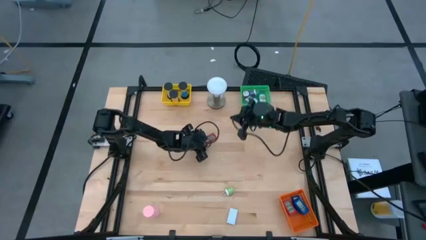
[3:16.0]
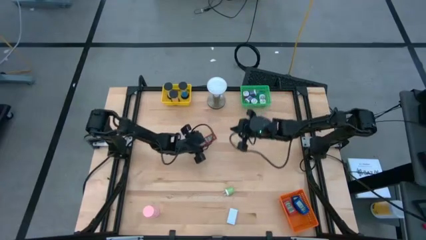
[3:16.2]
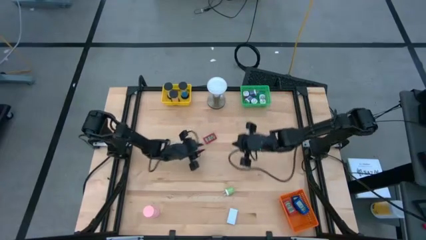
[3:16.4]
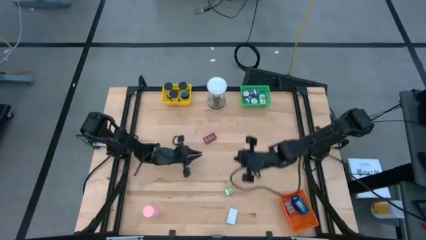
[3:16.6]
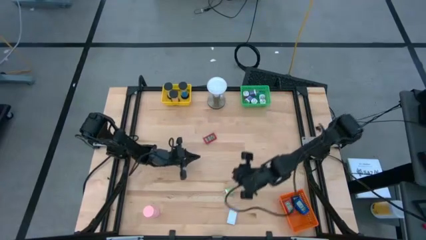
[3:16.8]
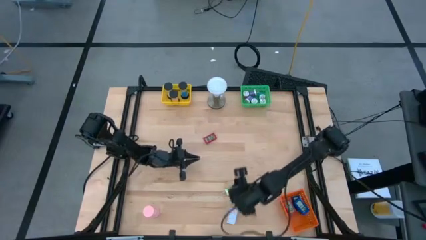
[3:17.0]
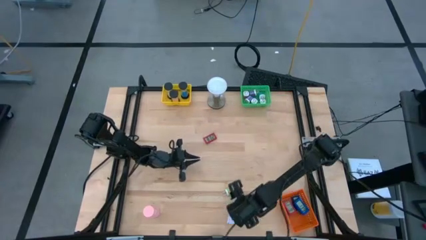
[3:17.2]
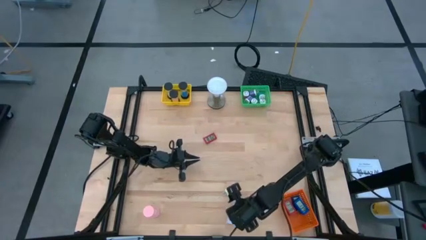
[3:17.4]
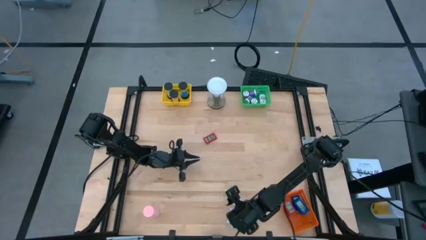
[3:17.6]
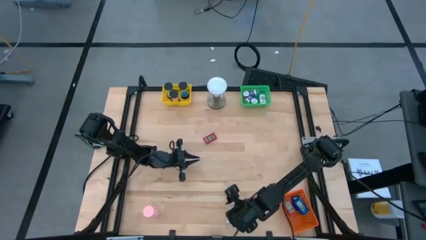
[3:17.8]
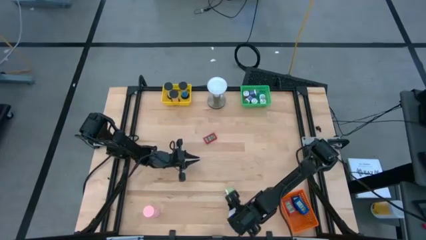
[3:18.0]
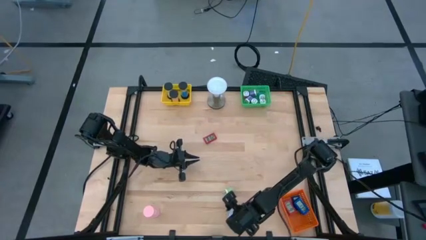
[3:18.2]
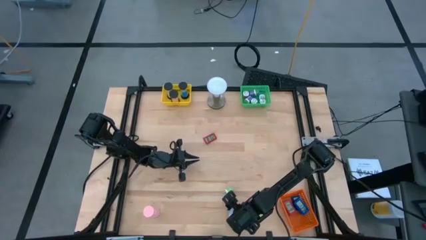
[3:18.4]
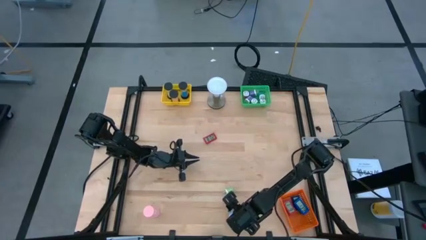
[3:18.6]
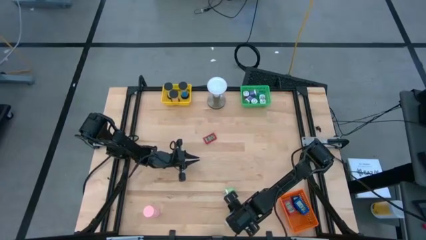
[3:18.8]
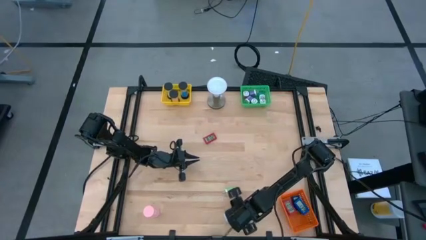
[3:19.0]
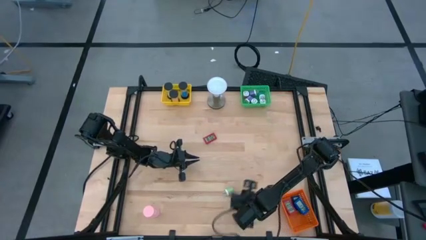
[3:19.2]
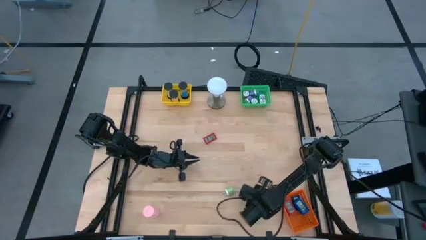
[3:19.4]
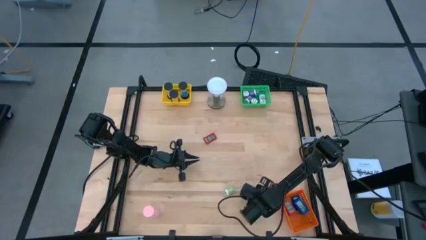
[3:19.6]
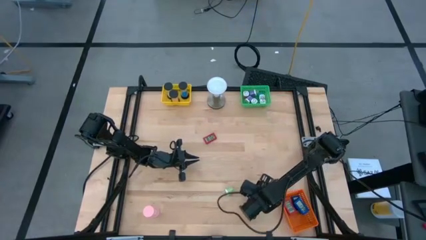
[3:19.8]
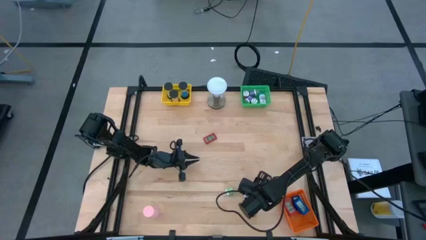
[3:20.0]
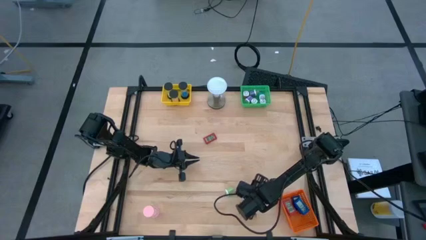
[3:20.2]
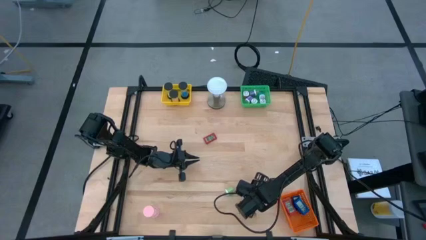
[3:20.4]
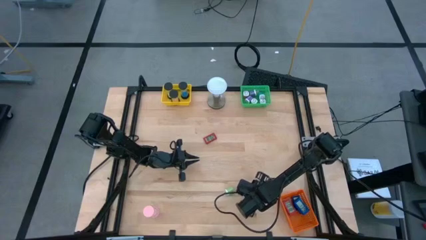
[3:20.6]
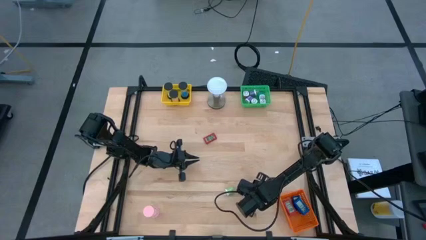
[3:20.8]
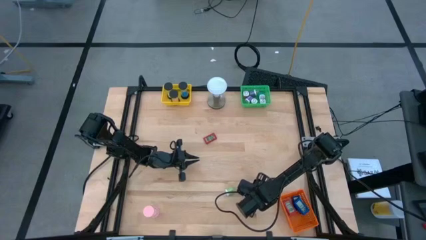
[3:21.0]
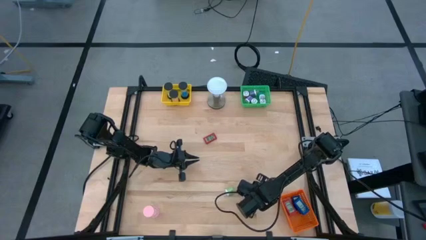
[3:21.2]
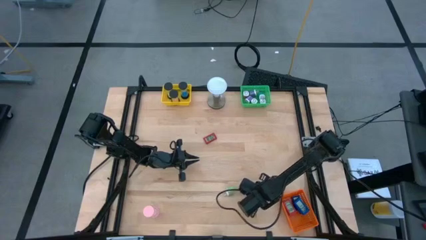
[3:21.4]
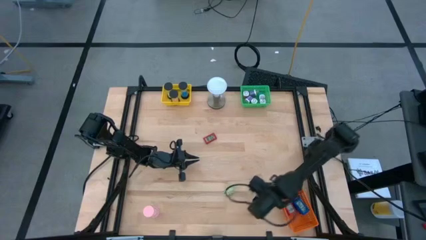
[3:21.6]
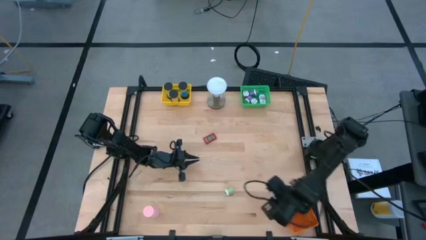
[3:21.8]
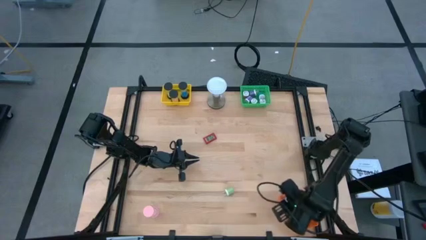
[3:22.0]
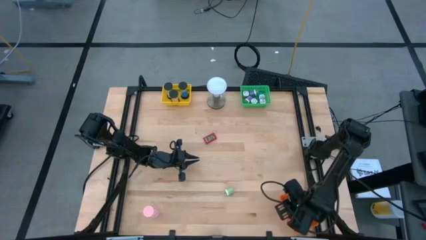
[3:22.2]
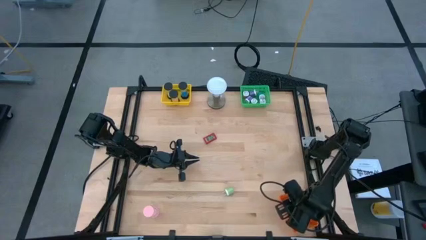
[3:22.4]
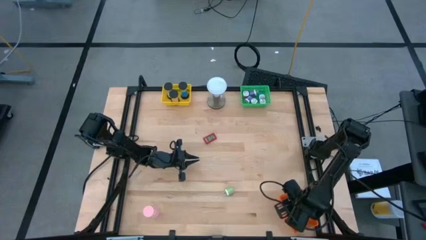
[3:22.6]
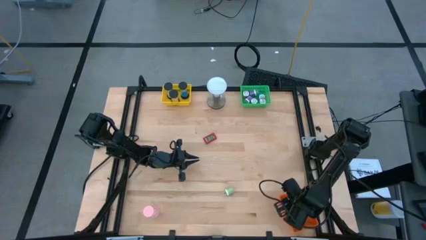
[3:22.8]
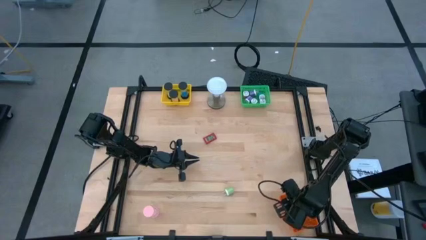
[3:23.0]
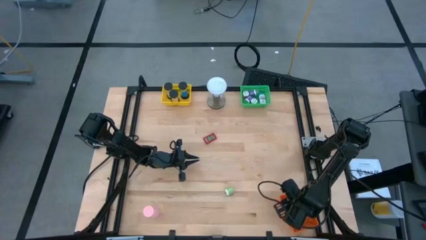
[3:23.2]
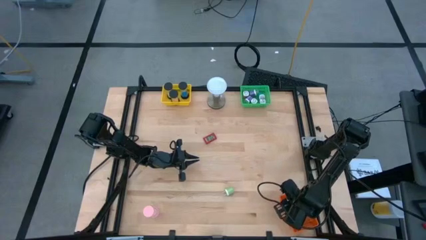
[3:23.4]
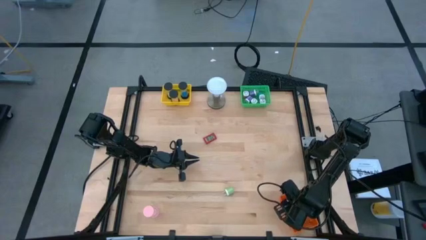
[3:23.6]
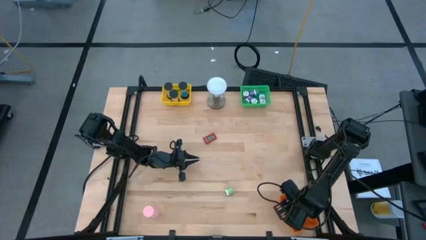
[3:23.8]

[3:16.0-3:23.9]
Task: Pick & Place Office items
Put the white digital timer into the orange bin

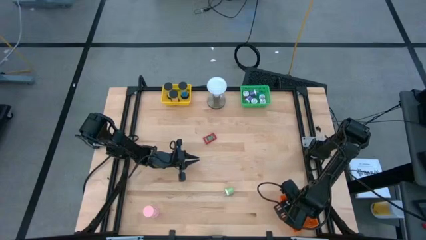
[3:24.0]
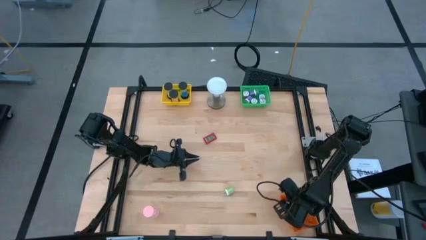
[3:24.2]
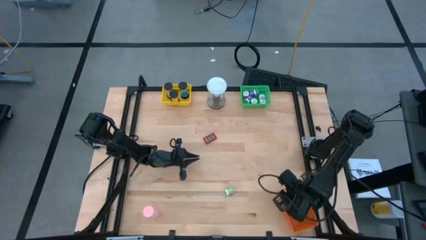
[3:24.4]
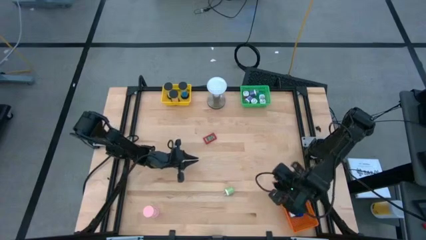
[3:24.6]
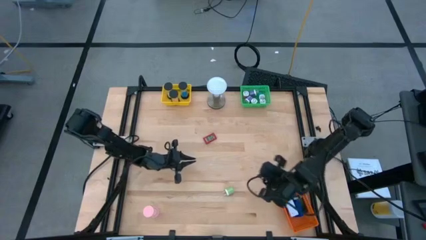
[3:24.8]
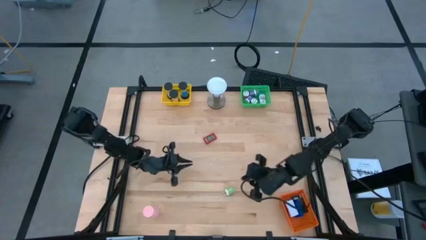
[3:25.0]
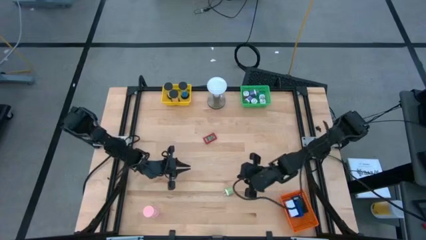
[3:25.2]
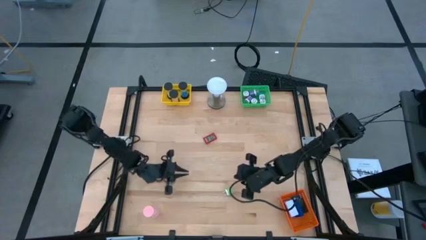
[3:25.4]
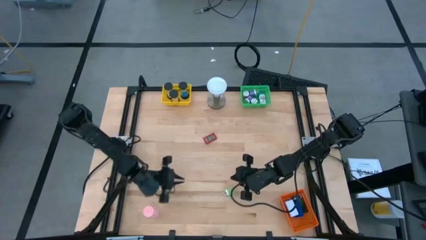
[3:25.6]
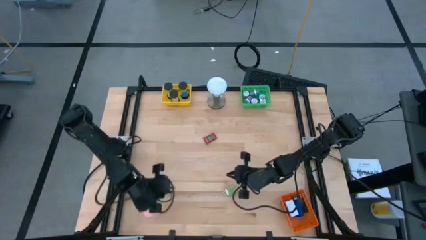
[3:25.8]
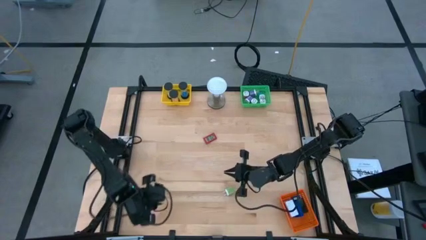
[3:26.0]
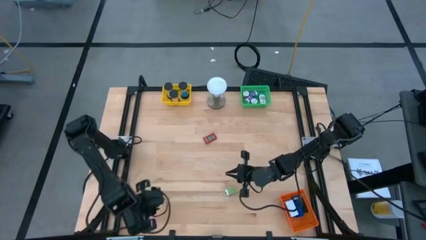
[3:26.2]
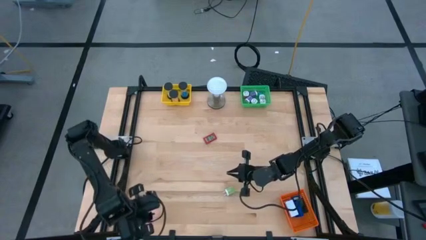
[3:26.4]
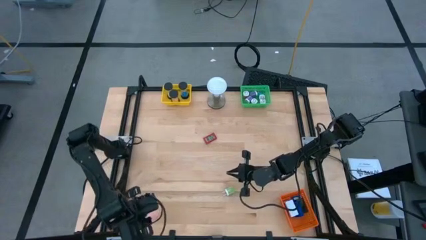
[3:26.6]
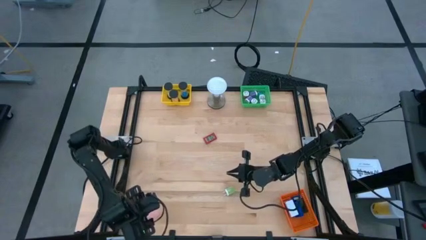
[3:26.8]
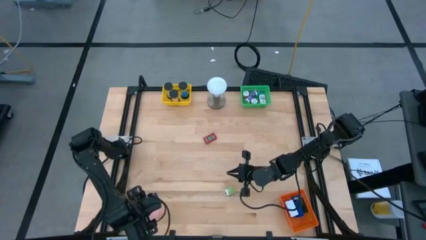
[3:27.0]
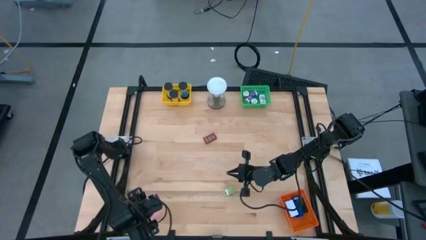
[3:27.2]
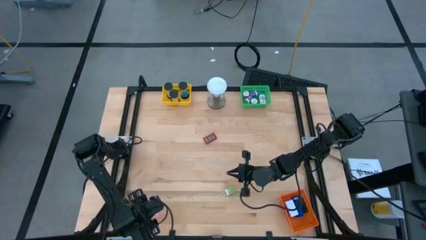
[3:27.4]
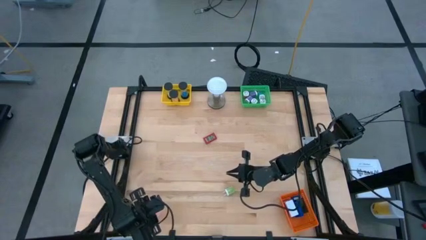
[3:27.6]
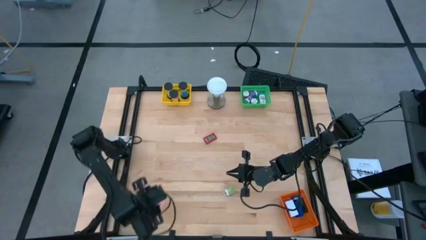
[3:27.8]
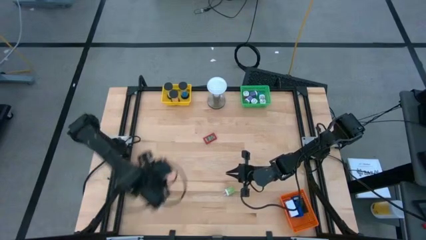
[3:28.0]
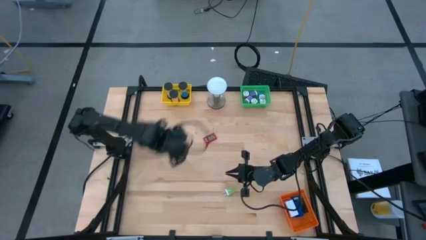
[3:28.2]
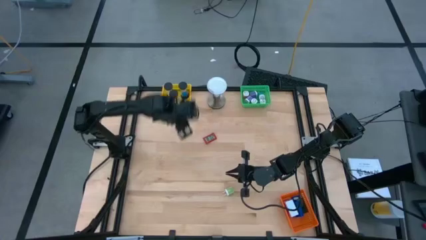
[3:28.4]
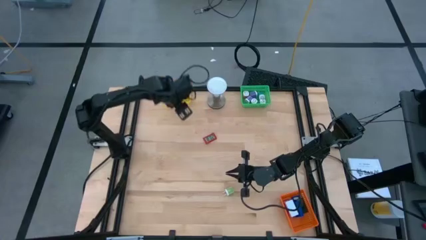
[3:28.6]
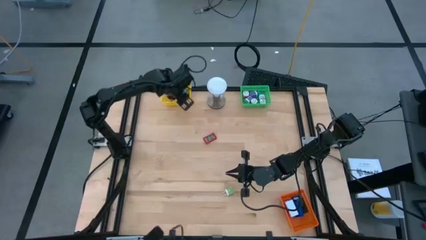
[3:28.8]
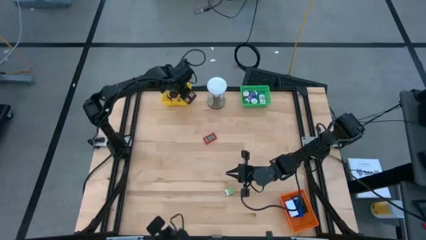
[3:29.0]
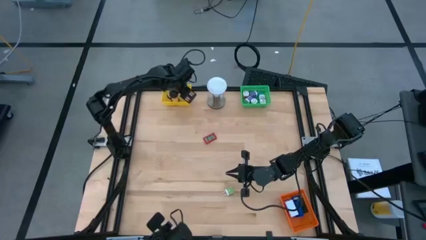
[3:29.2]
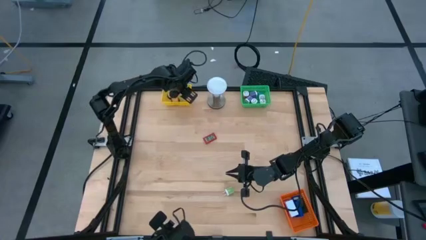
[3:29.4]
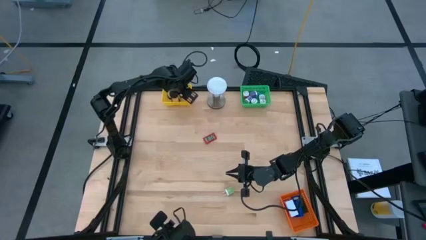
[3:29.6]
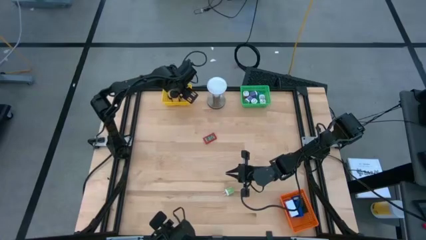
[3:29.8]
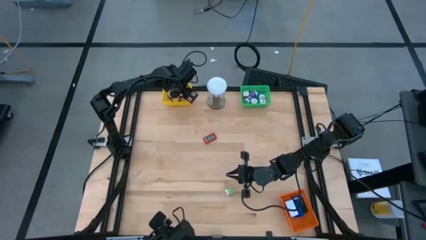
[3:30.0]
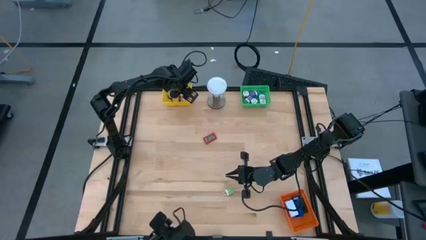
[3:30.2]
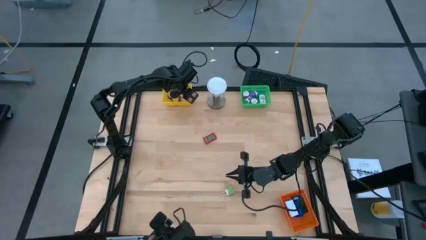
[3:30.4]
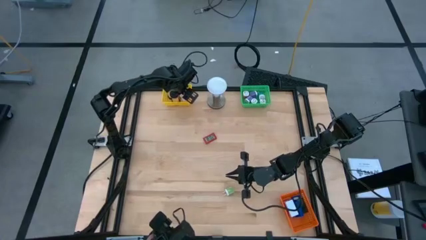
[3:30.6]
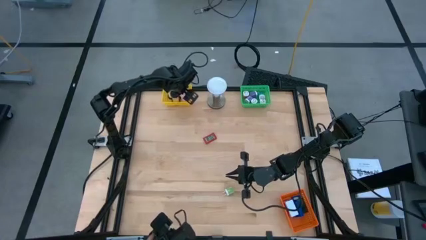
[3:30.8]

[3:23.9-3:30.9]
Put the pink hourglass into the yellow bin
